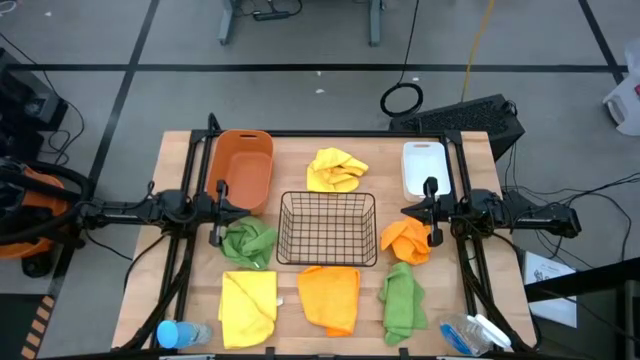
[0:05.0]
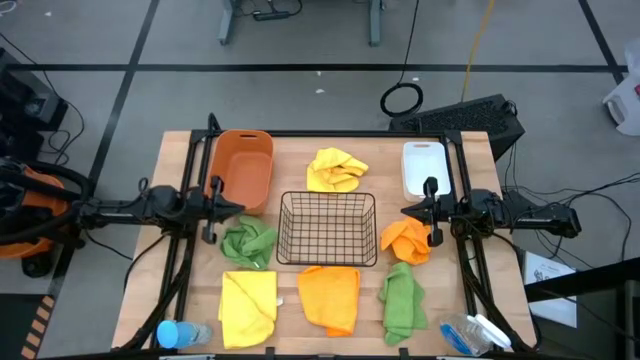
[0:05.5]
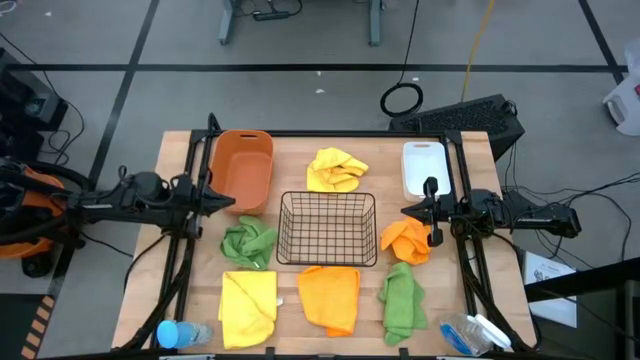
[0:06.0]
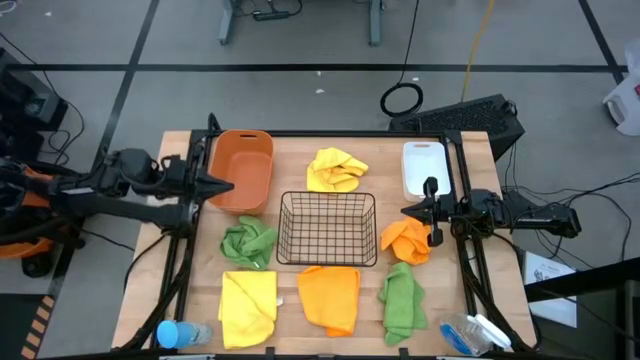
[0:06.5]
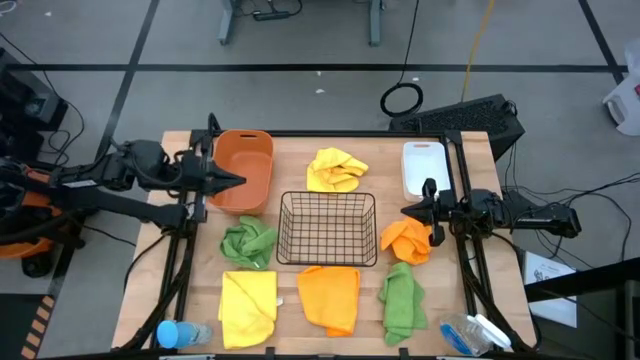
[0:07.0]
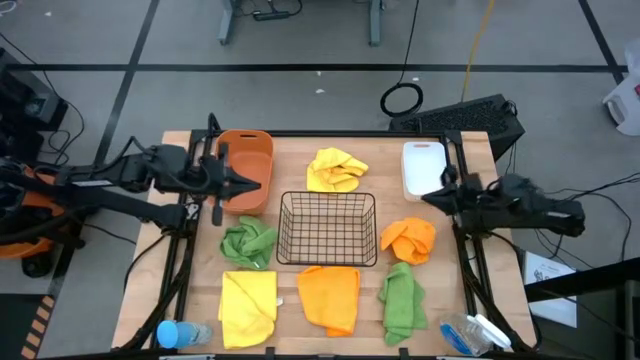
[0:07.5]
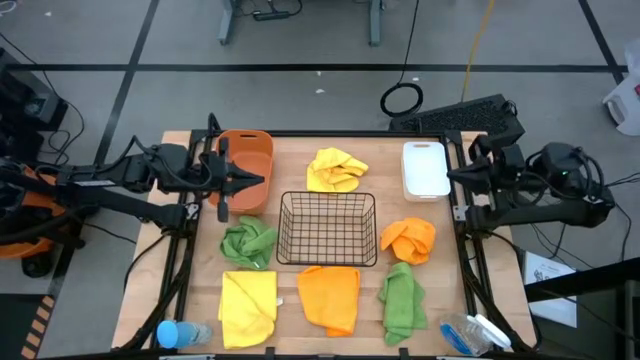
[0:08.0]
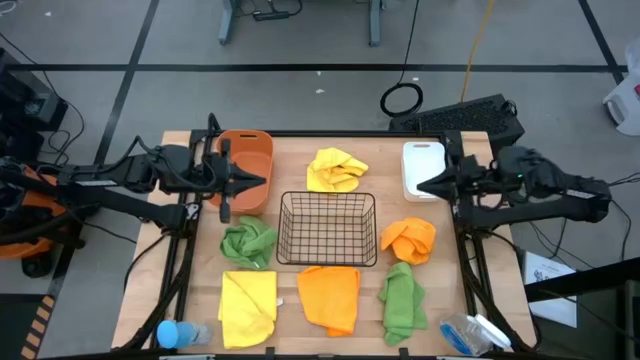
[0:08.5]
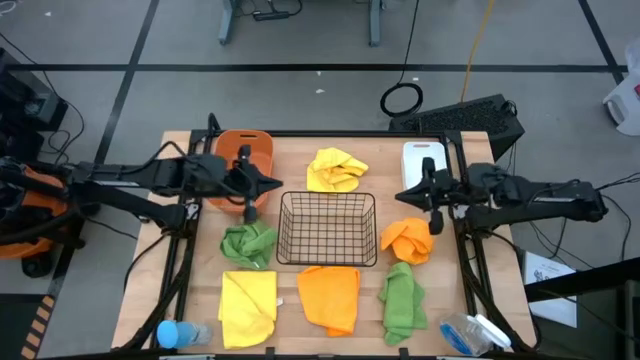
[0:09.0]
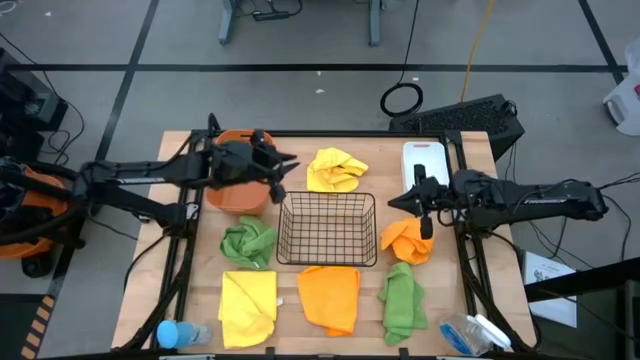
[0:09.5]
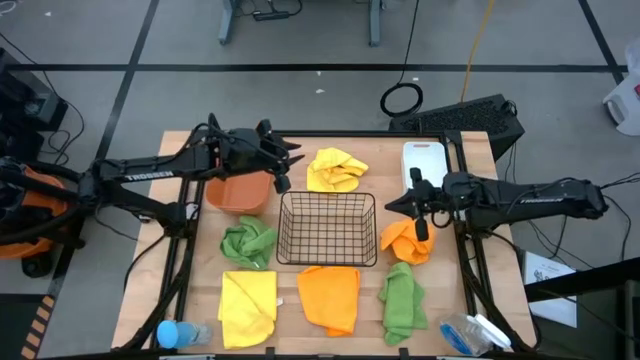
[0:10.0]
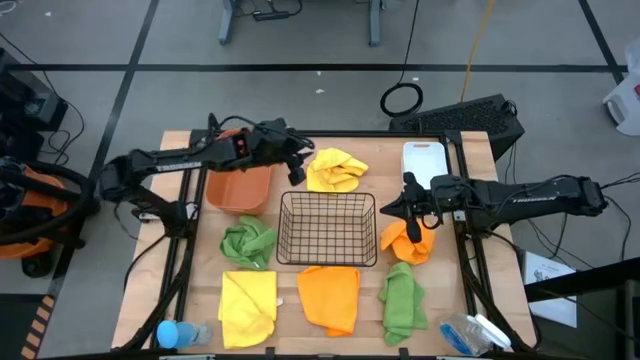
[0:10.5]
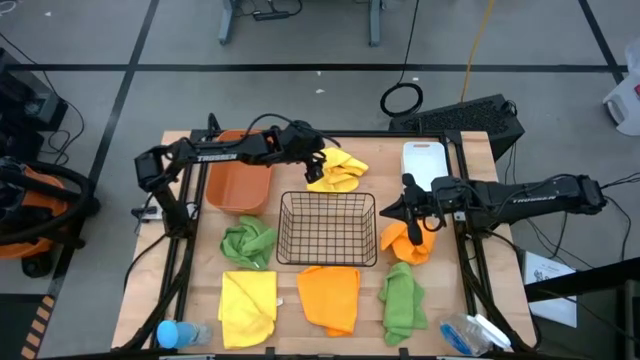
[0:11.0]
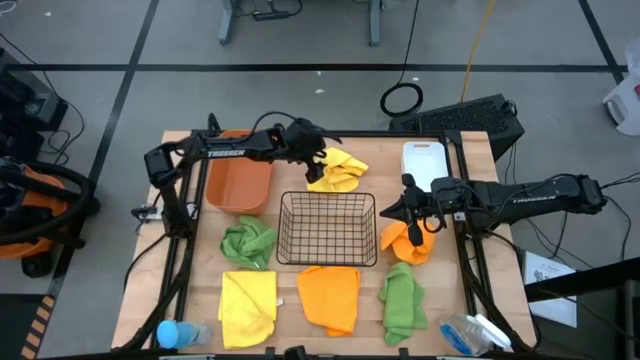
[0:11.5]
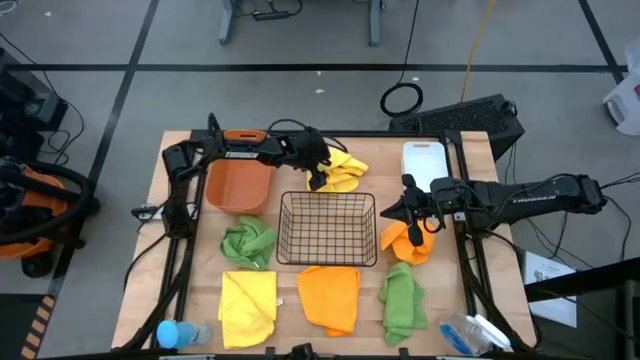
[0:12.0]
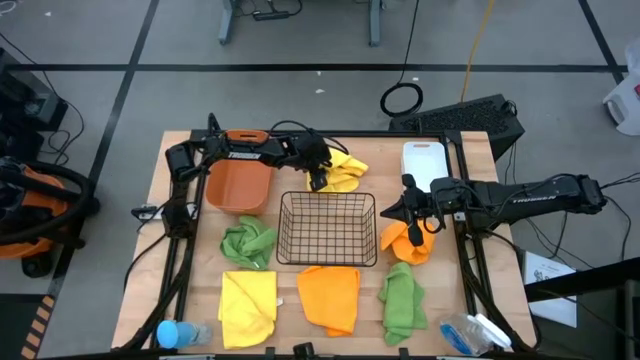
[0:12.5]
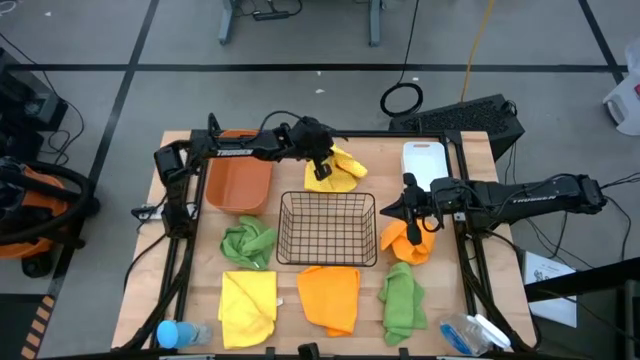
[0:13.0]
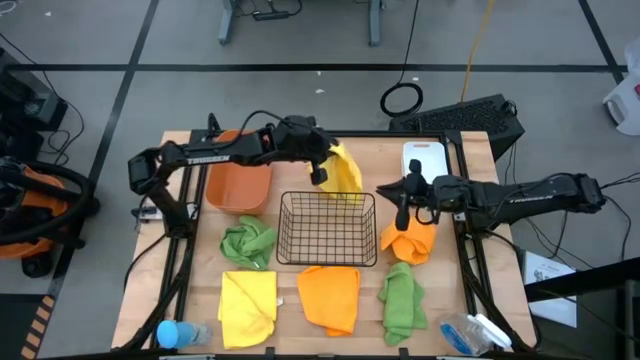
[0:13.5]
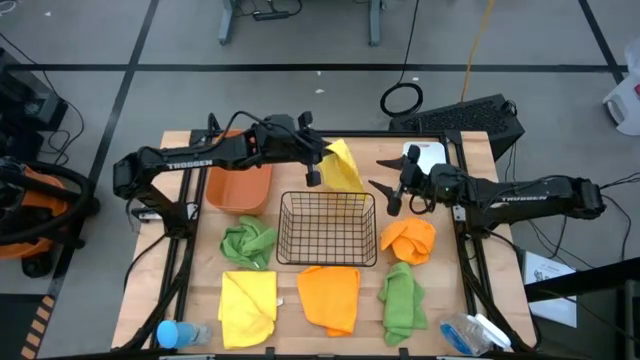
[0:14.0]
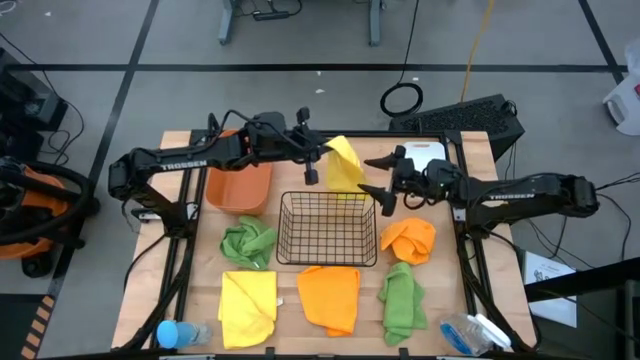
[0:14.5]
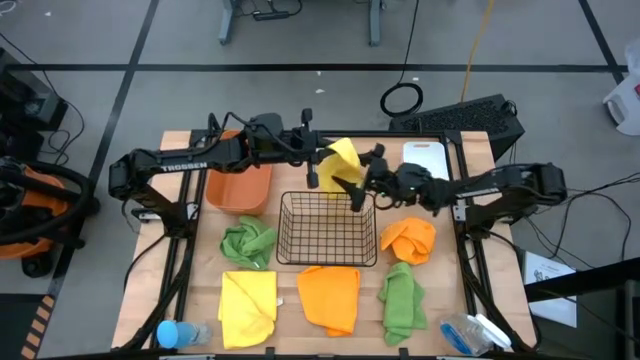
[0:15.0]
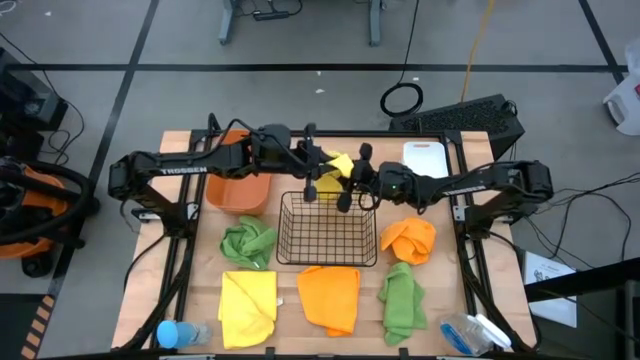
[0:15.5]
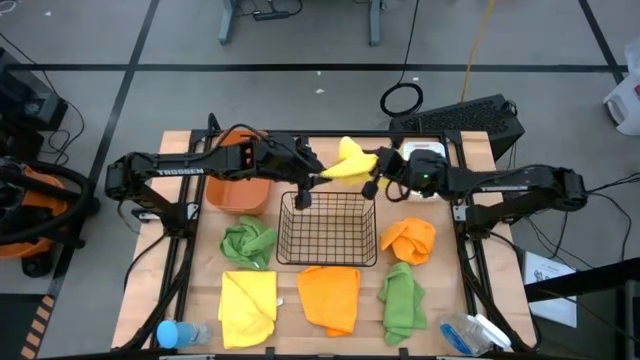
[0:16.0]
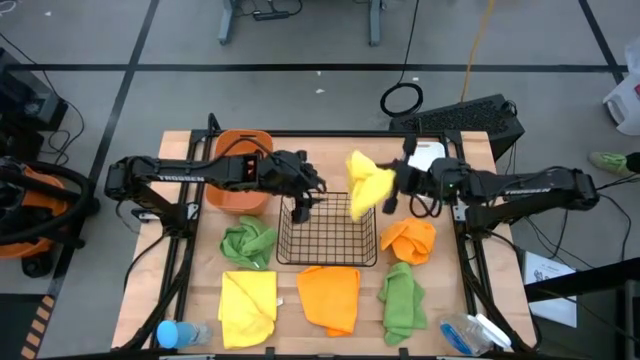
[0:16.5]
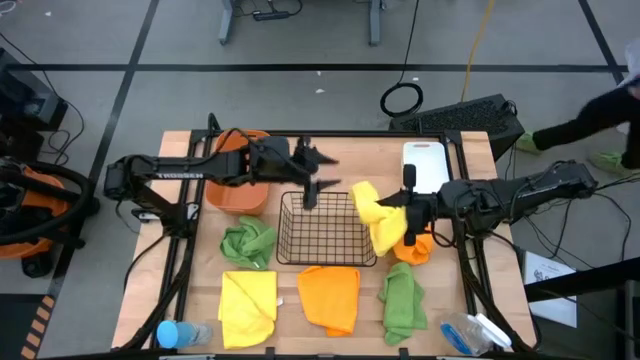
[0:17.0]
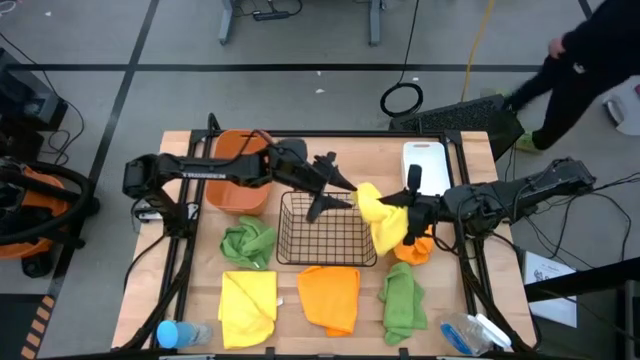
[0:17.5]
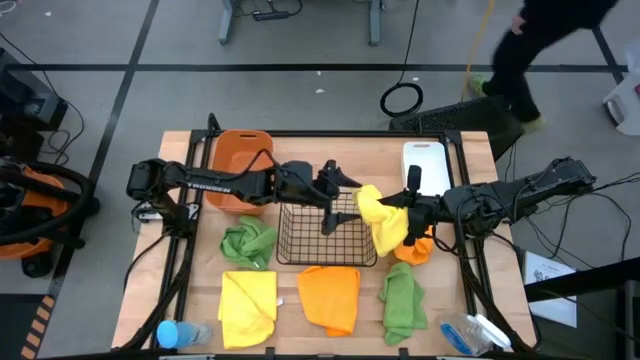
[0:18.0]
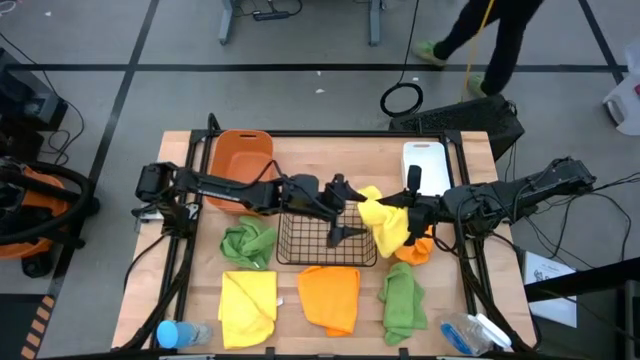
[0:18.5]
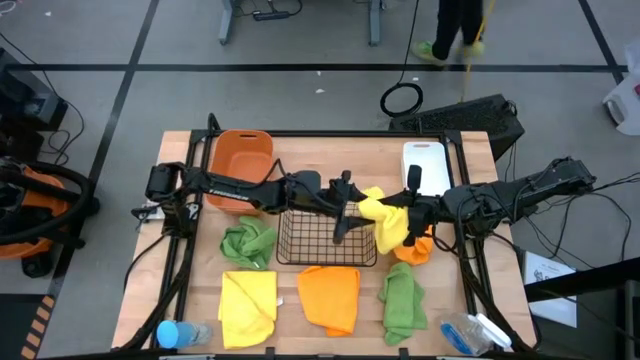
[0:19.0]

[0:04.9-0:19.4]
Task: Sort microfiber towel by color & place in baskets
Put the top yellow microfiber towel into the white bin

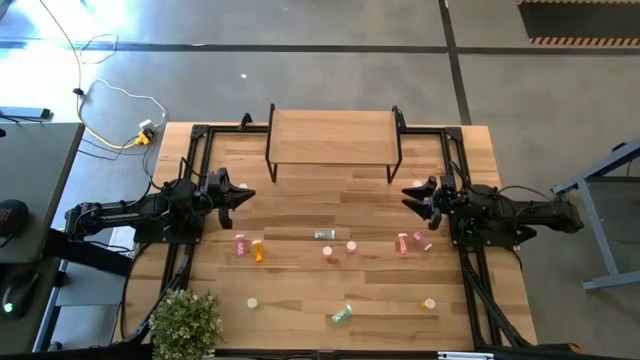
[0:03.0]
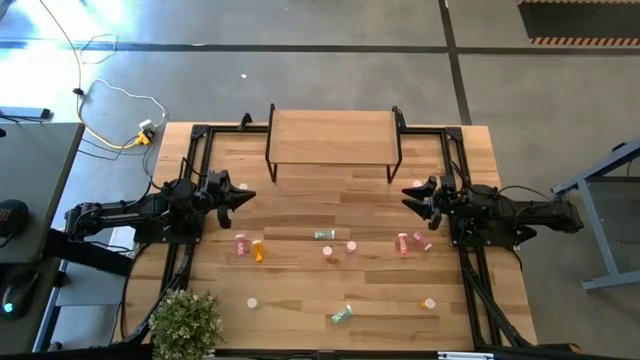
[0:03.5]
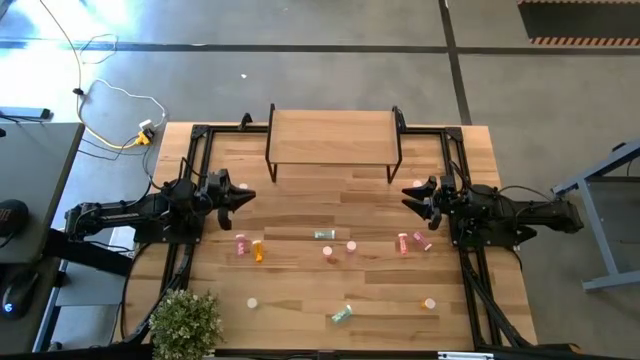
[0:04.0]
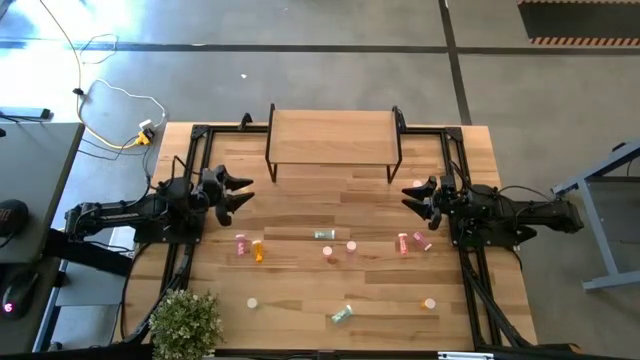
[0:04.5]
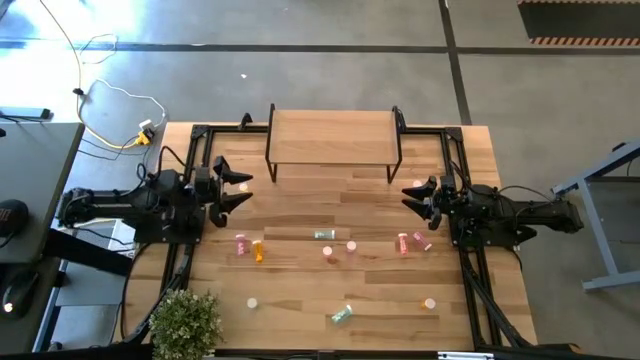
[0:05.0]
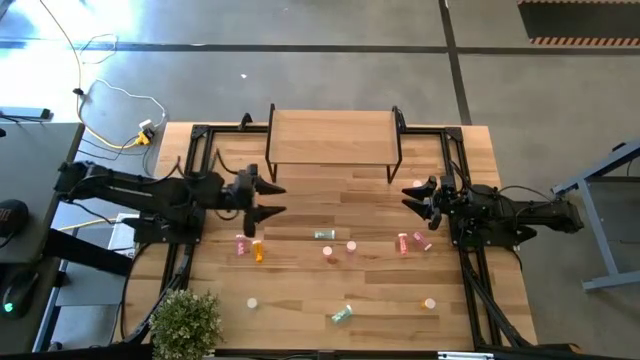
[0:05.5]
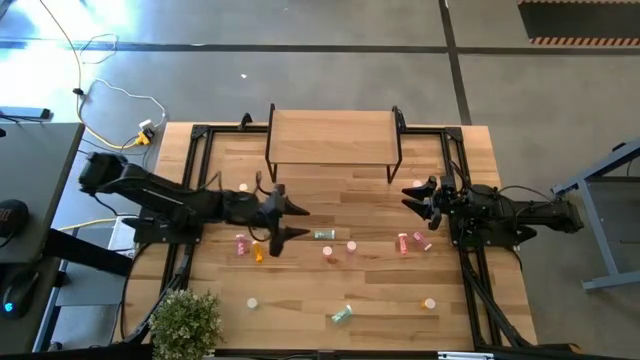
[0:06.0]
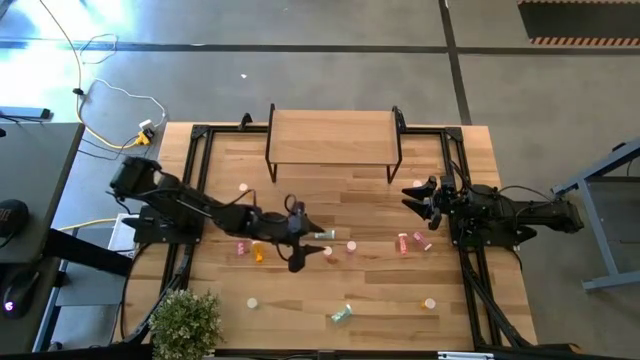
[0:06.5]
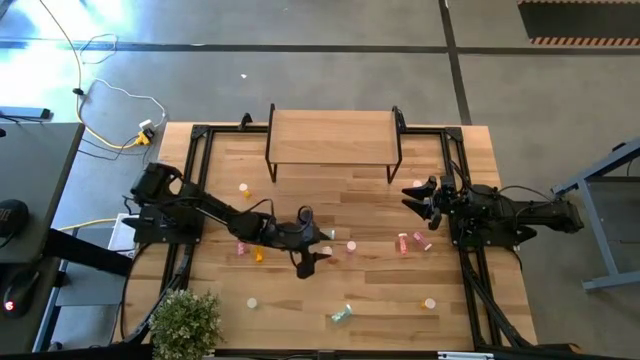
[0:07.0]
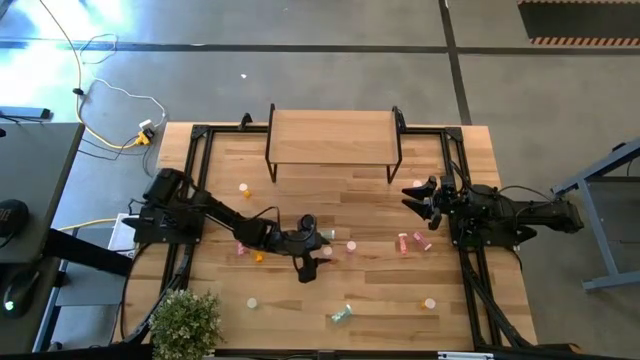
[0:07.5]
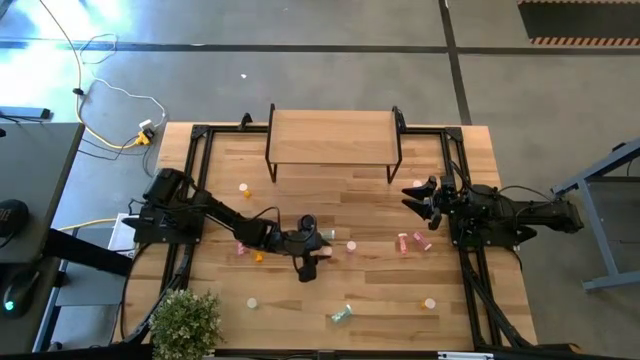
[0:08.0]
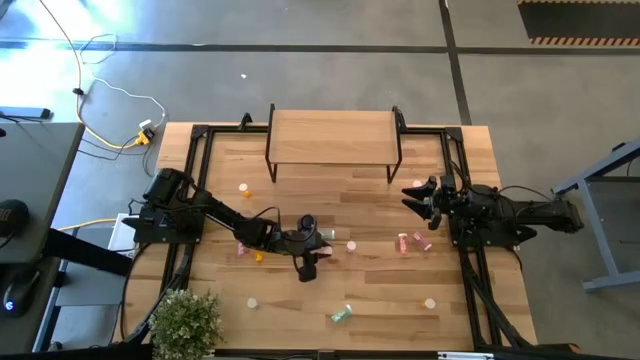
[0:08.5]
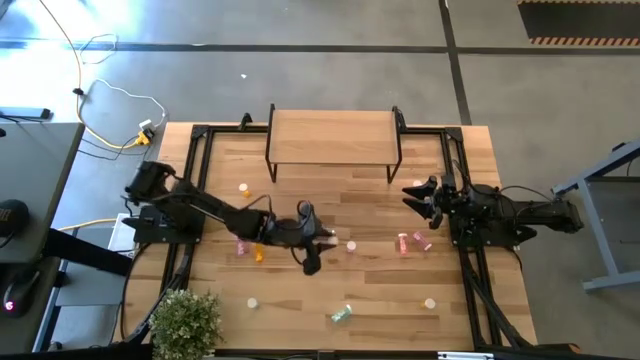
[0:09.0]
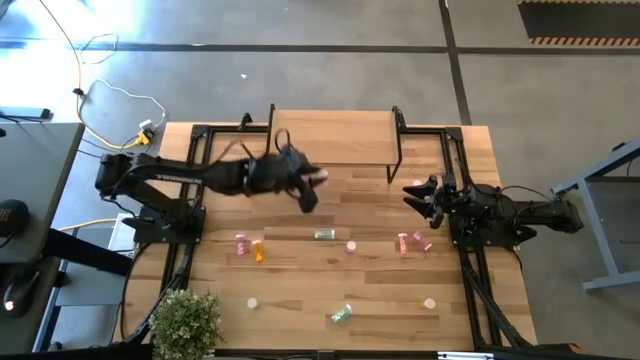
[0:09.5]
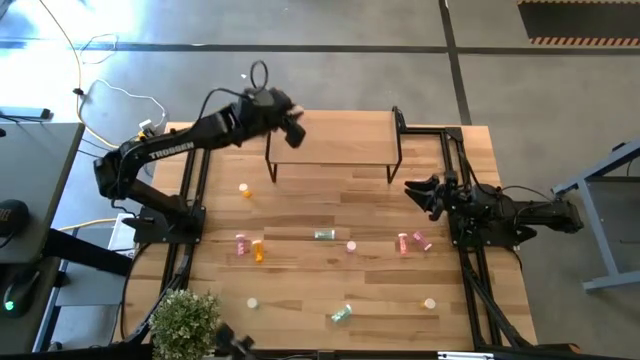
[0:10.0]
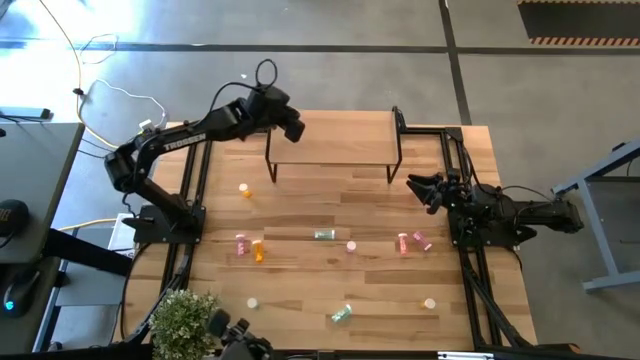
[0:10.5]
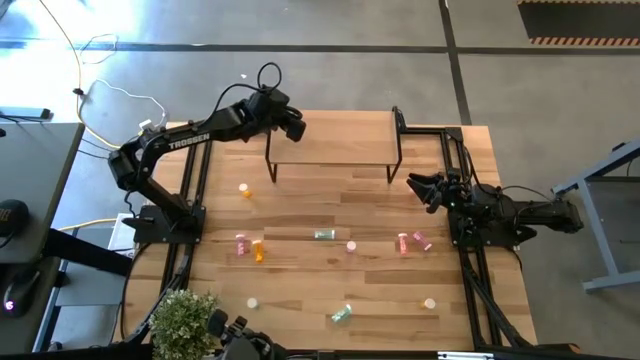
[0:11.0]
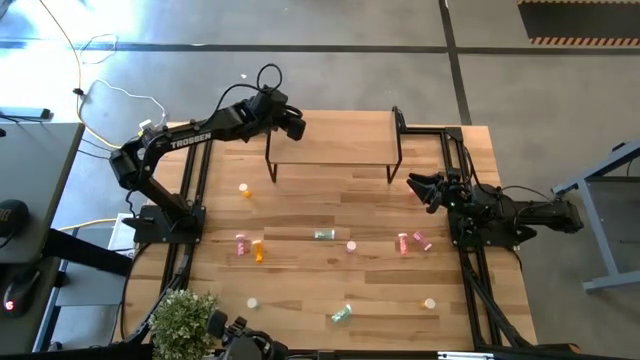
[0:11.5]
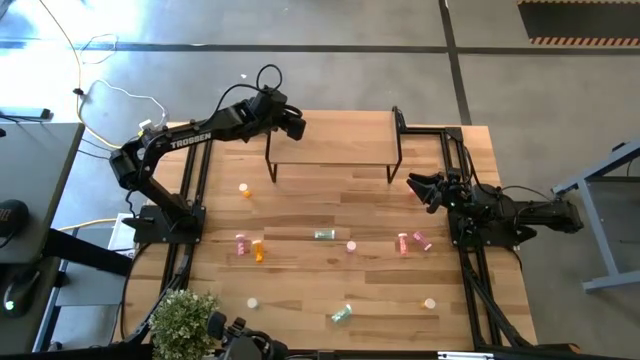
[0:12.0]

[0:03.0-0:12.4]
Task: Pick and place medicine bottles onto shelf by color
Put the bottom left pink pill bottle on the shelf
